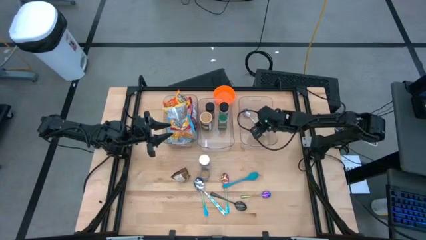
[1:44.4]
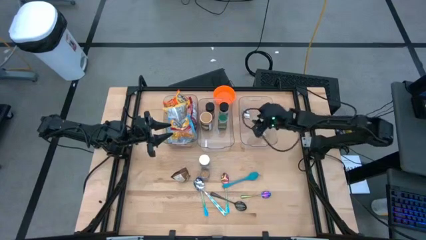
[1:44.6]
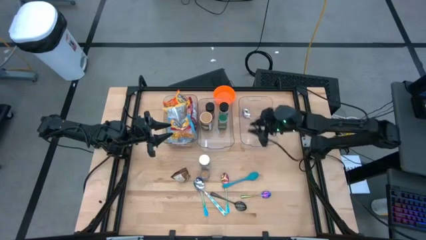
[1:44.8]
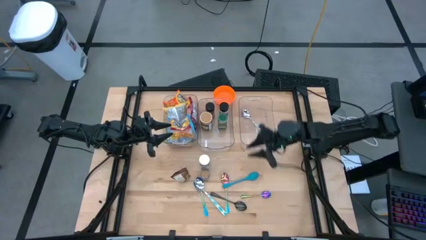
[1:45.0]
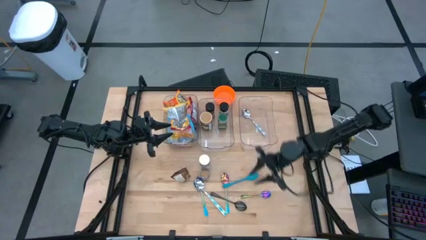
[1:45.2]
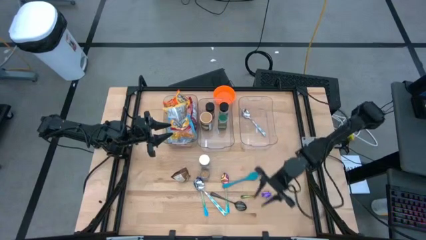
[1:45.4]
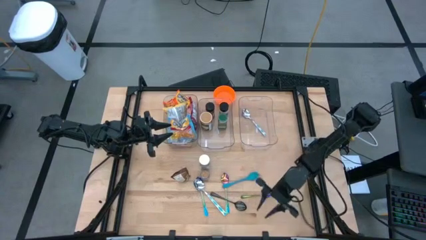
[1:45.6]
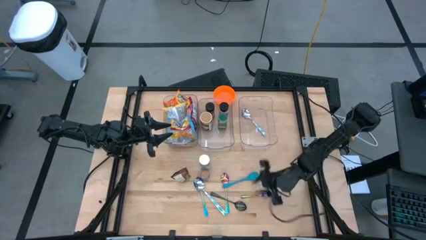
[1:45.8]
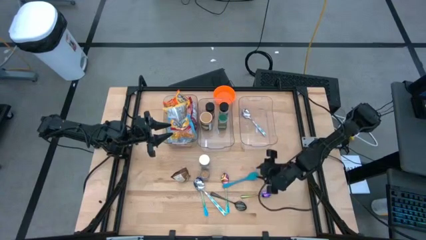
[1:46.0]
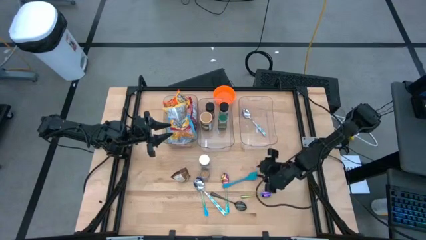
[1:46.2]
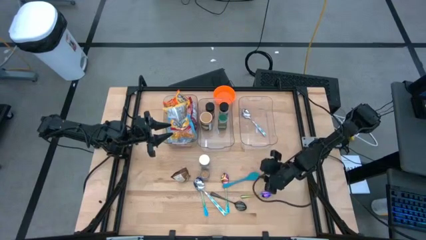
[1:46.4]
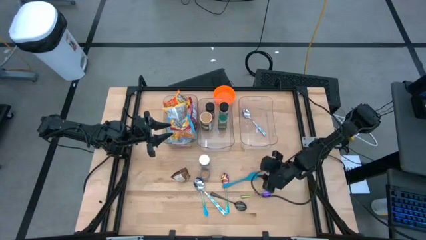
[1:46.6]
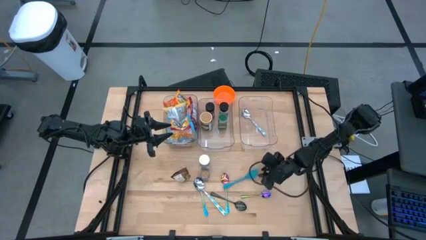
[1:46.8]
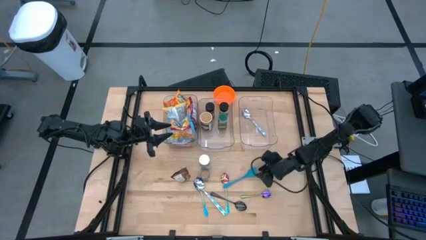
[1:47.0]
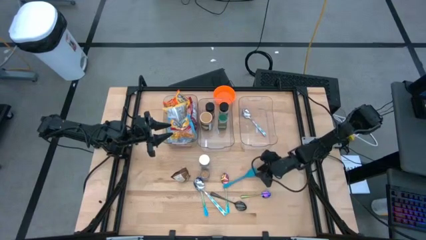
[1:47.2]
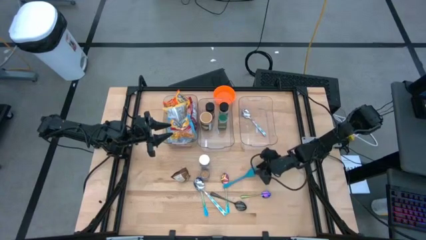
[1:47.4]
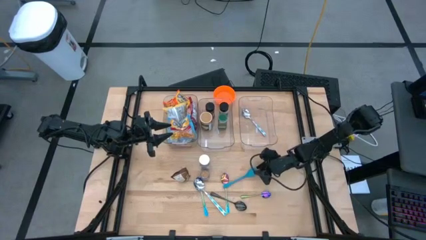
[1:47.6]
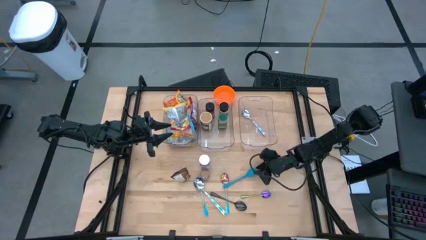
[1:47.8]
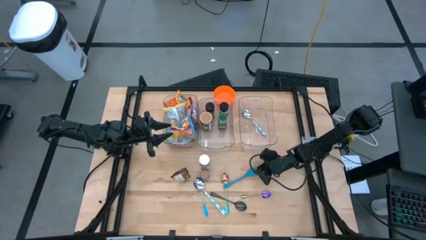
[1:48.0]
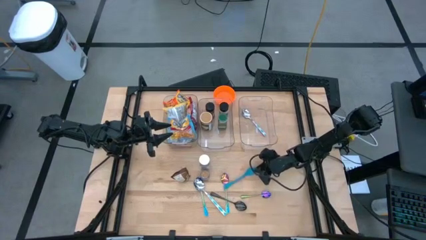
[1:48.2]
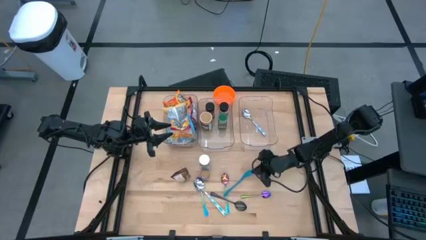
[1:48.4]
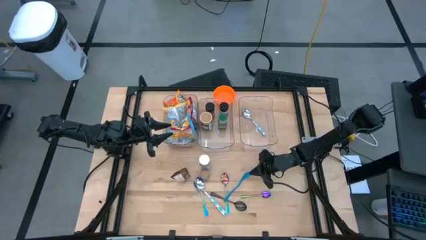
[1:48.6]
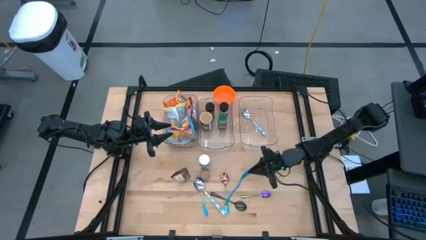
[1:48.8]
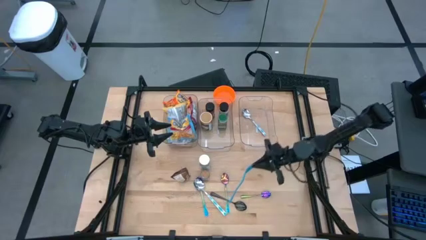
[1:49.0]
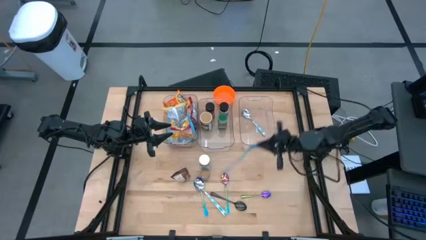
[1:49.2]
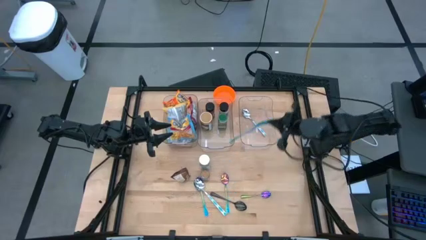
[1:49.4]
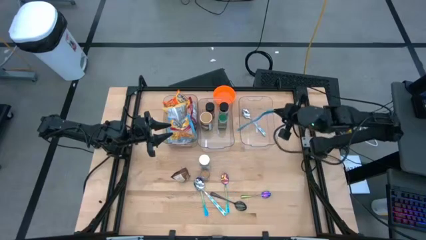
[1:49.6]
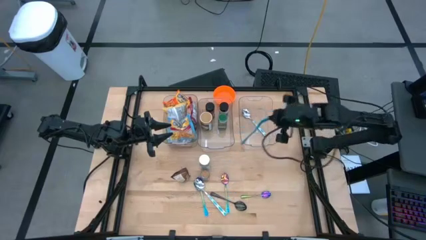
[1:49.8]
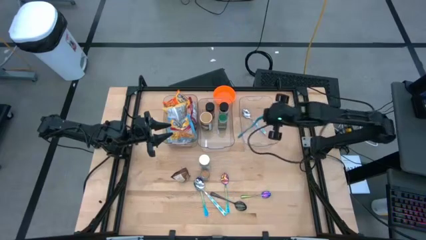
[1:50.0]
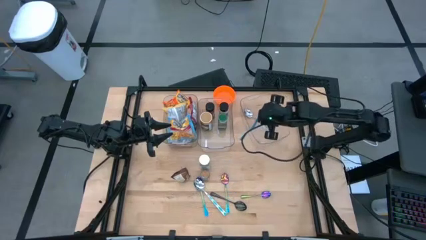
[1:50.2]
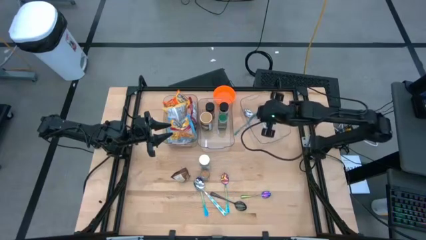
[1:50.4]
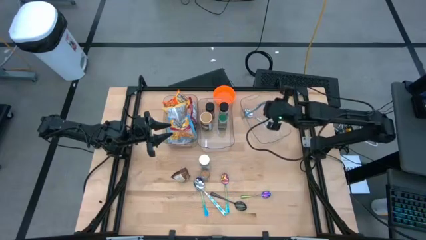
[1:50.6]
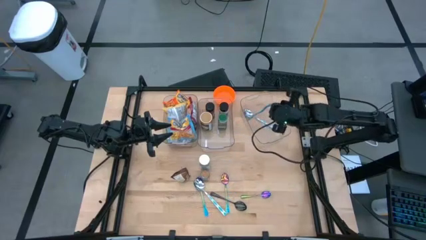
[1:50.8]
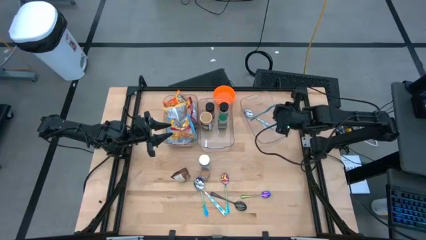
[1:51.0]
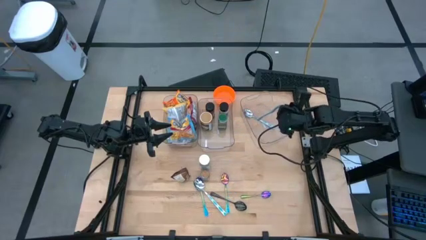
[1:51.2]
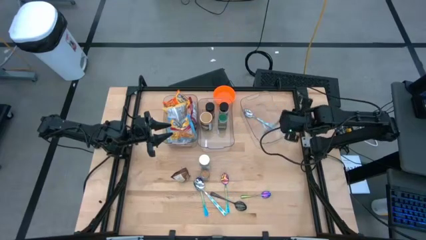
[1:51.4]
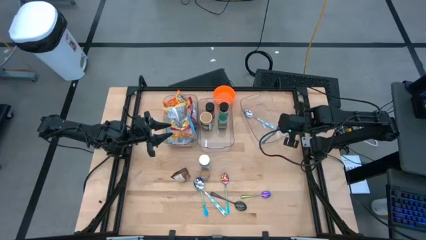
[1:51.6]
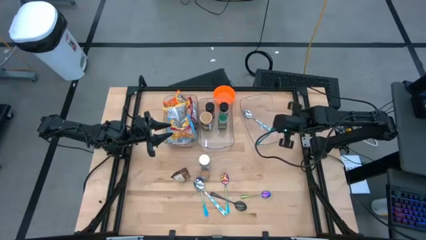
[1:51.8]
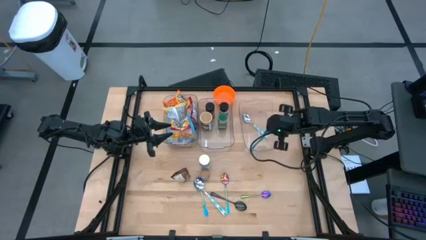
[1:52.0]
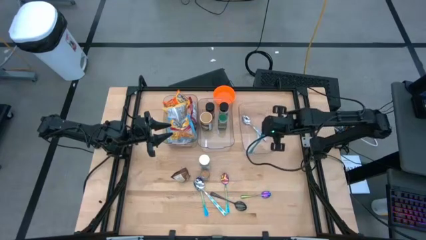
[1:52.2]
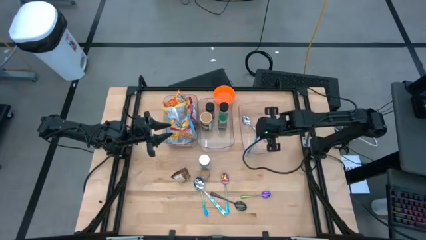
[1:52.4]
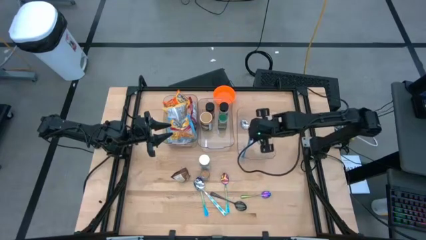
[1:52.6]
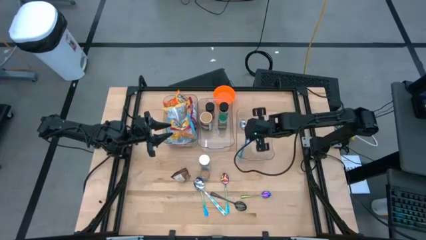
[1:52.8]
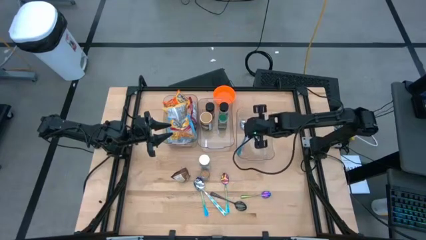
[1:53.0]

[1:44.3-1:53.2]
Task: Pick & Place Food Item
Put the blue baby spoon into the right transparent bin

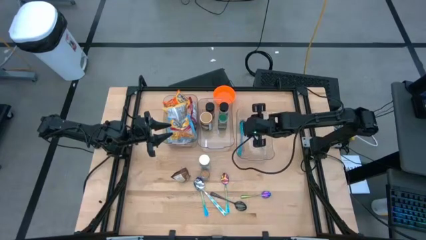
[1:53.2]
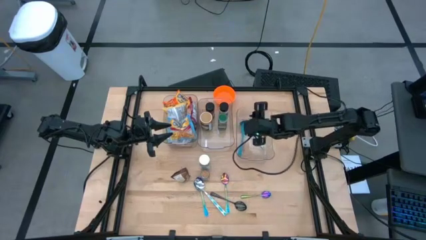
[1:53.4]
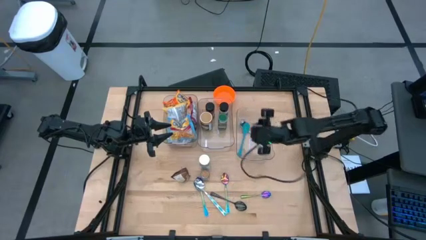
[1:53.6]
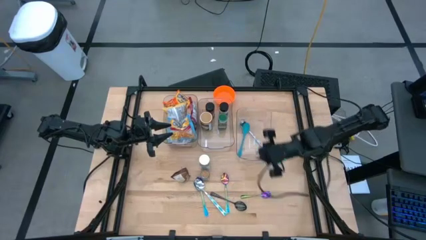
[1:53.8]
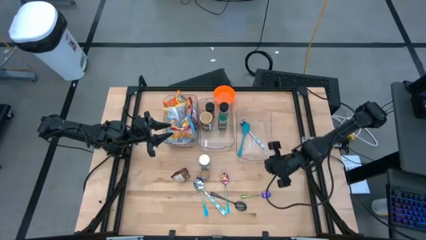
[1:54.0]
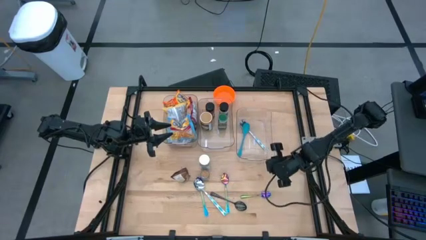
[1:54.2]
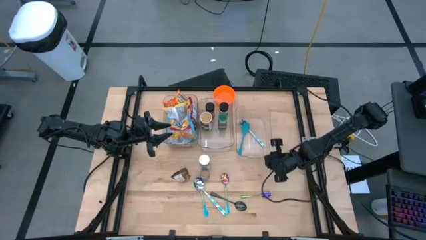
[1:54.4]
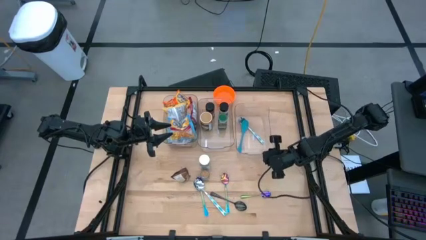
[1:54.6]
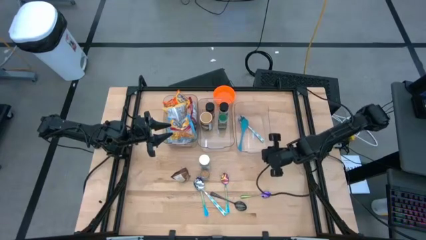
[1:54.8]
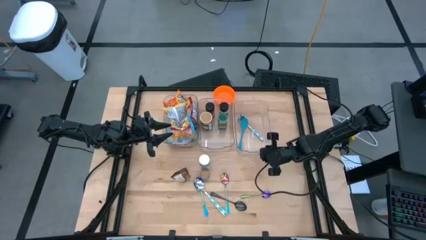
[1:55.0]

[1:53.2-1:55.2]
Adjust the right transparent bin

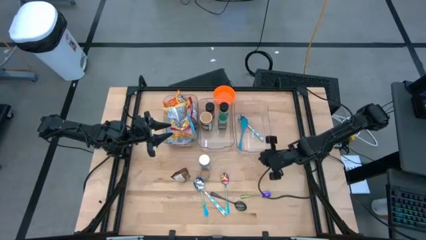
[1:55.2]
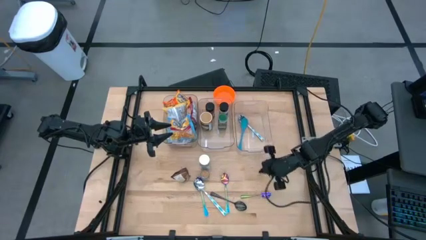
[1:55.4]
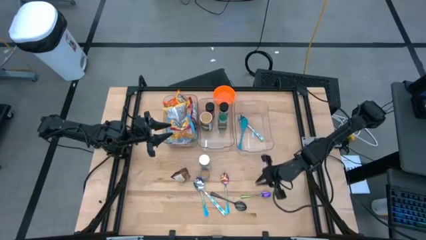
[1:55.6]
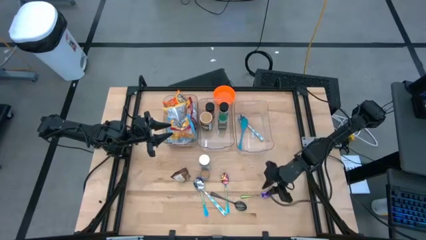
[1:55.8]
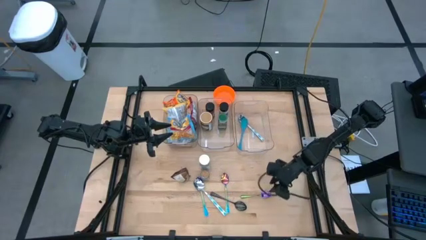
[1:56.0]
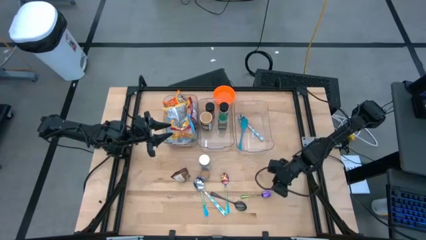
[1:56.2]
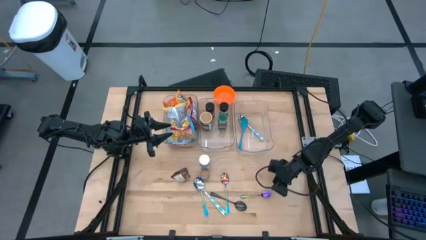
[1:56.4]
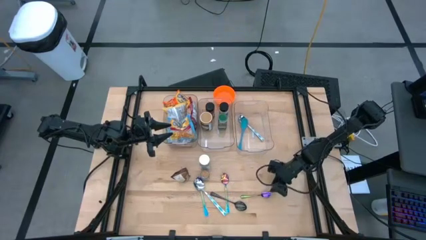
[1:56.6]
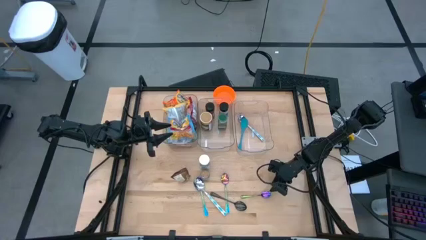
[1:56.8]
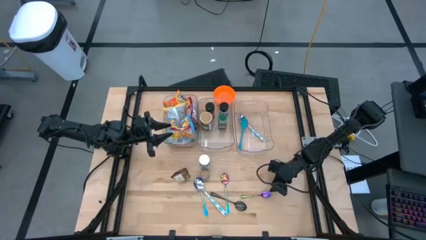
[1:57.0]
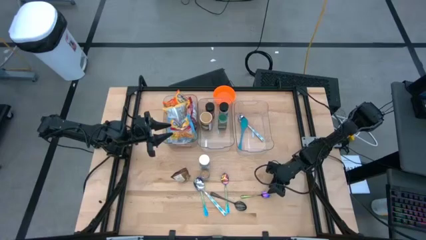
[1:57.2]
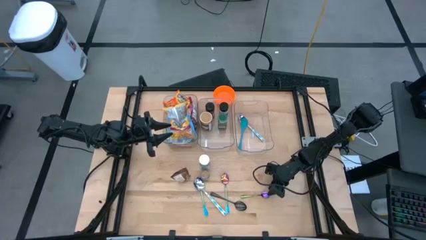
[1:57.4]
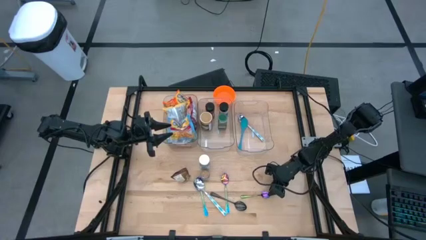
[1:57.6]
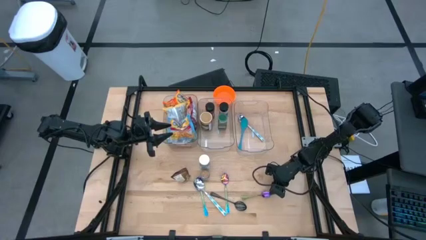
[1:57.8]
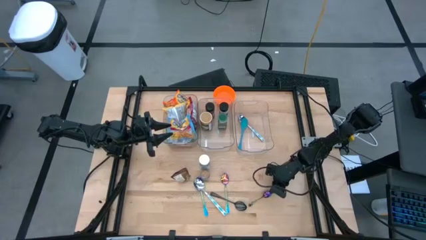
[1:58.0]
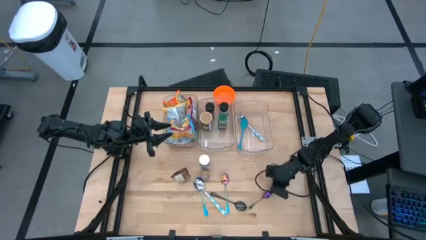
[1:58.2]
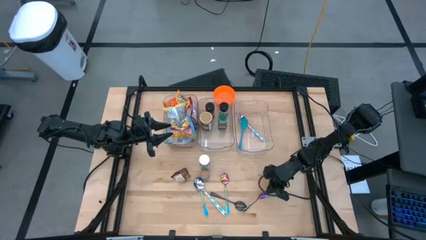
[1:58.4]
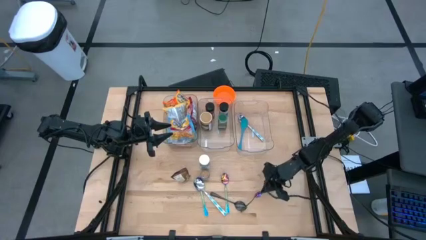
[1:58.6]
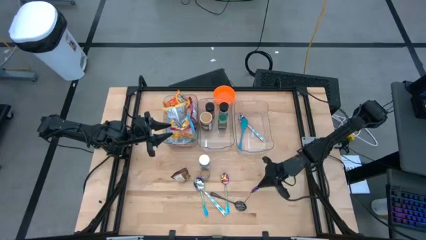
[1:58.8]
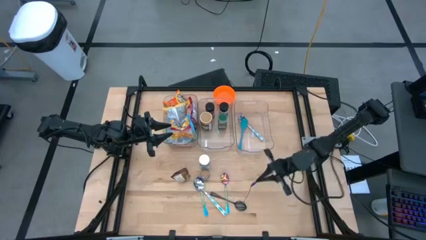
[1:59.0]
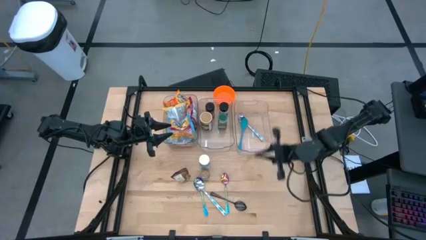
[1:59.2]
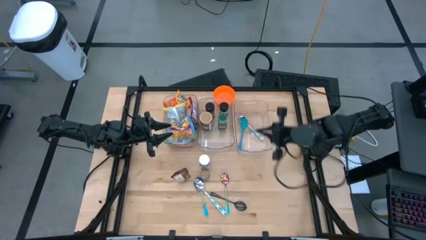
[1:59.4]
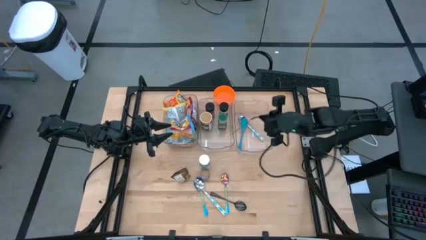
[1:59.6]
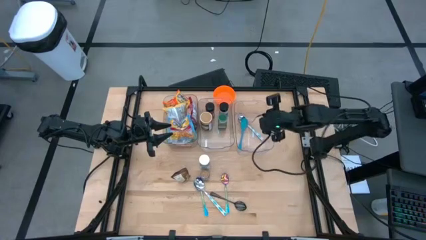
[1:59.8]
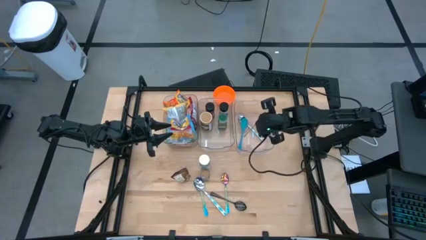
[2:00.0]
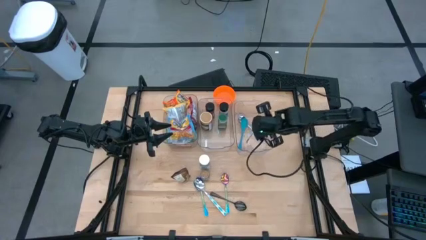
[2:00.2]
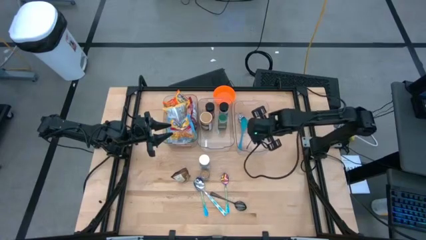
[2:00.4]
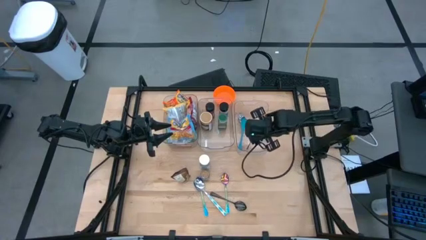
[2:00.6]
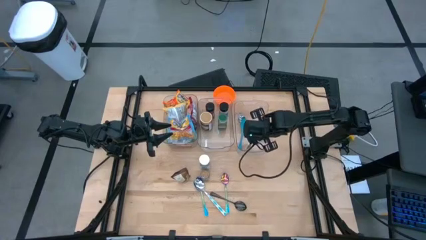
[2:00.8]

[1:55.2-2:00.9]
Put the right purple spoon into the right transparent bin
